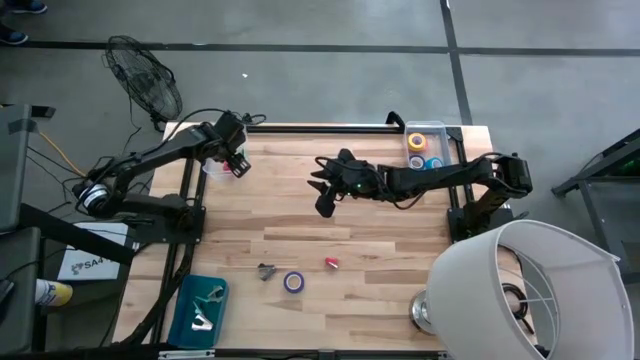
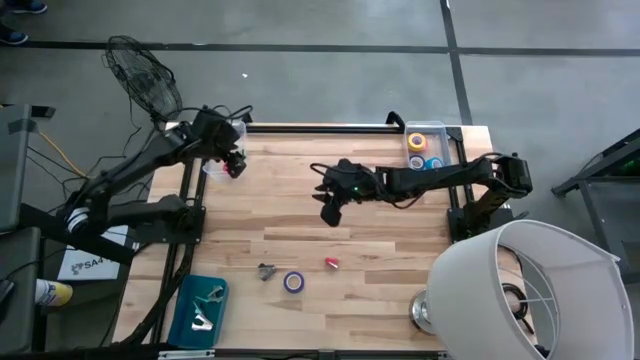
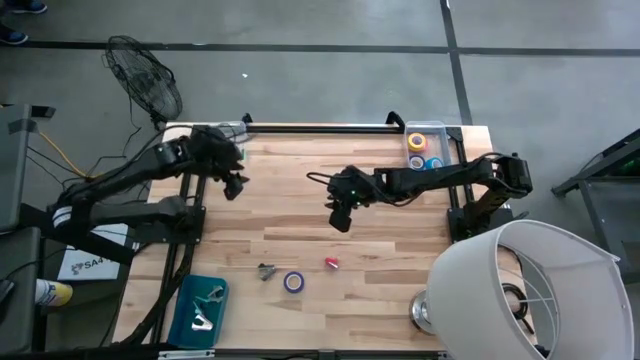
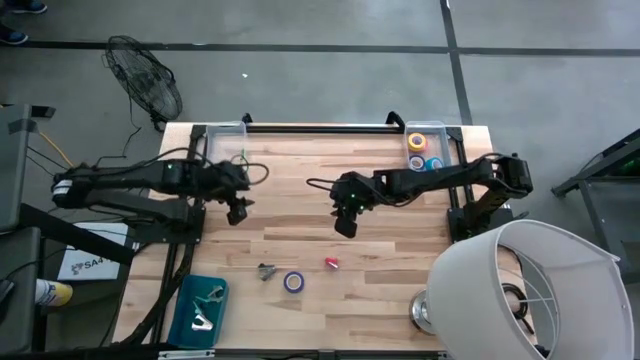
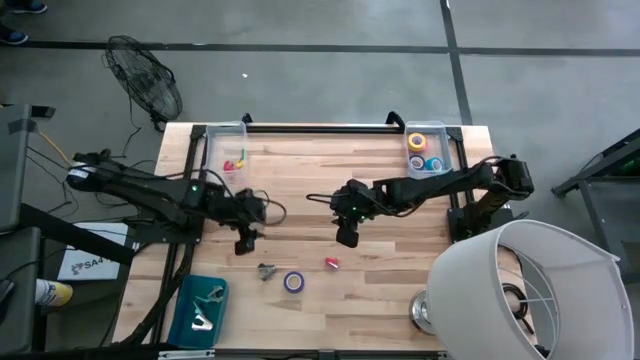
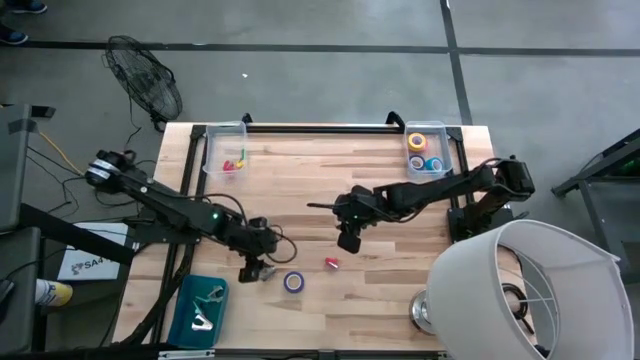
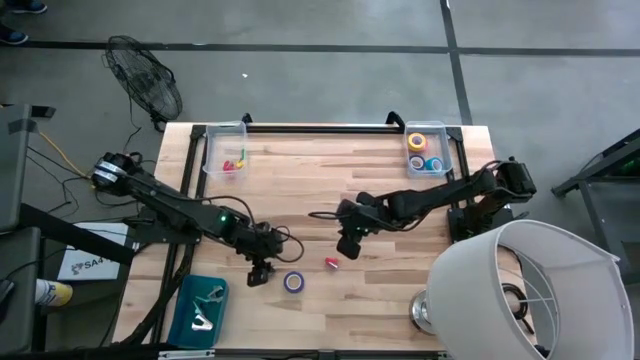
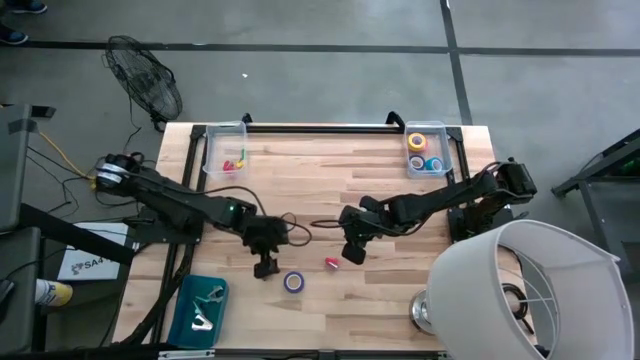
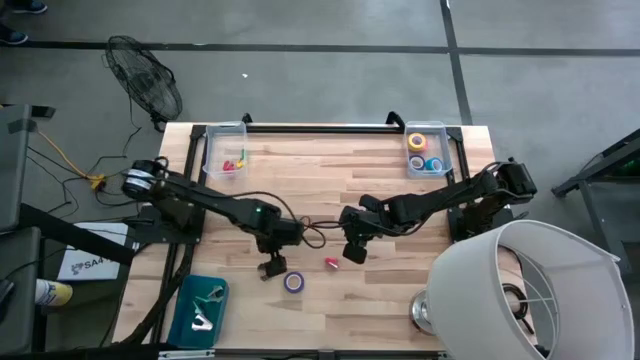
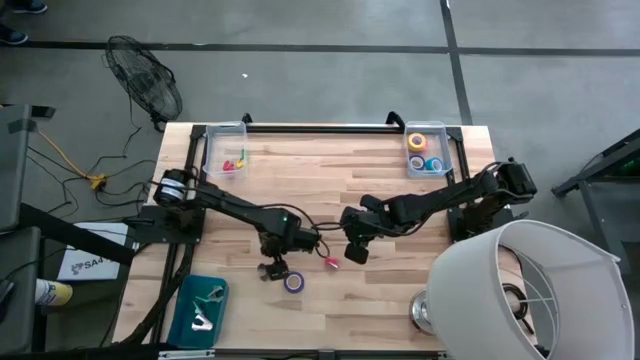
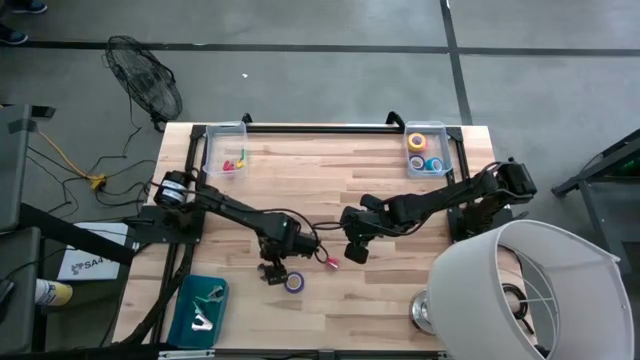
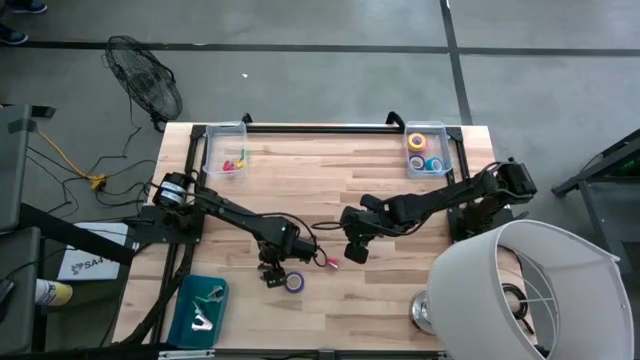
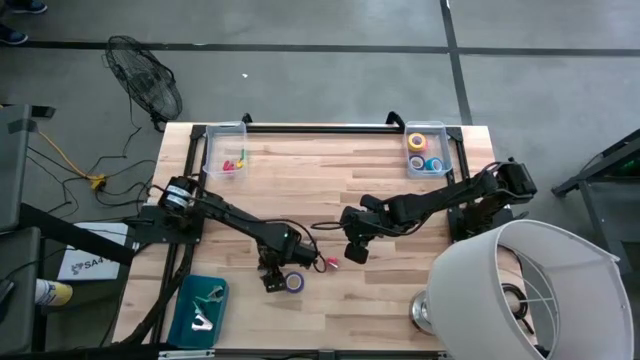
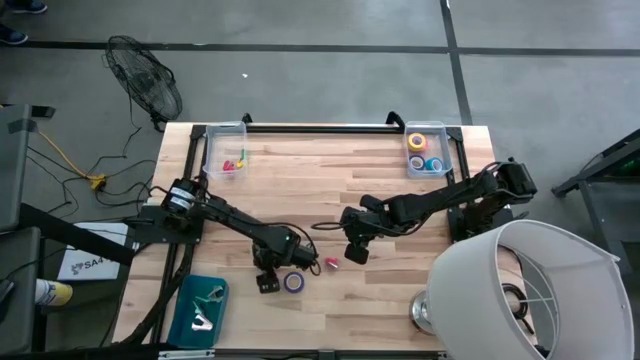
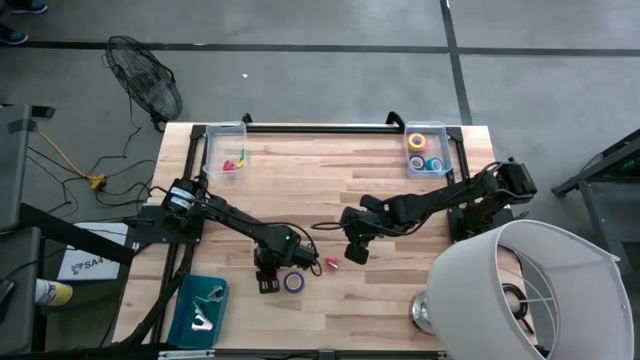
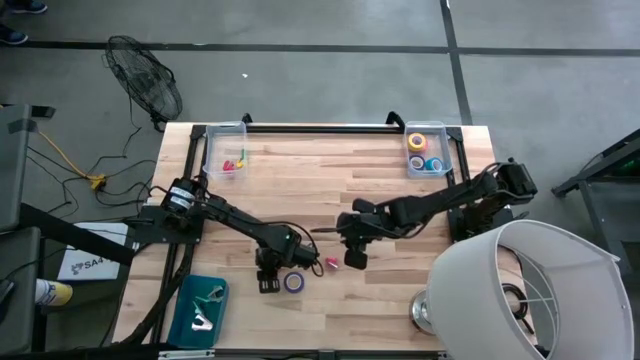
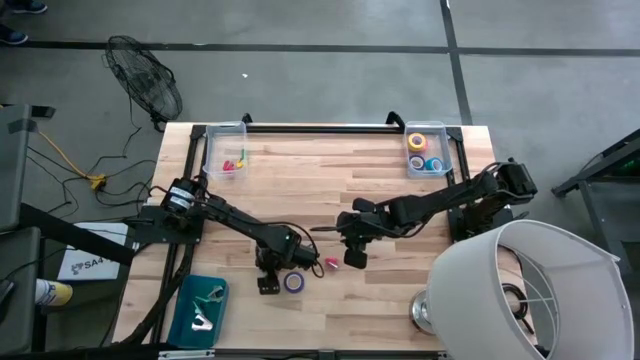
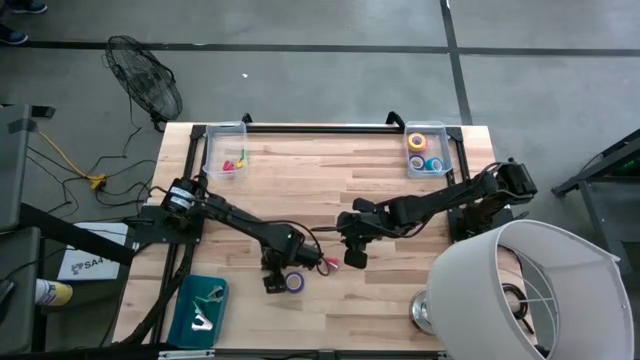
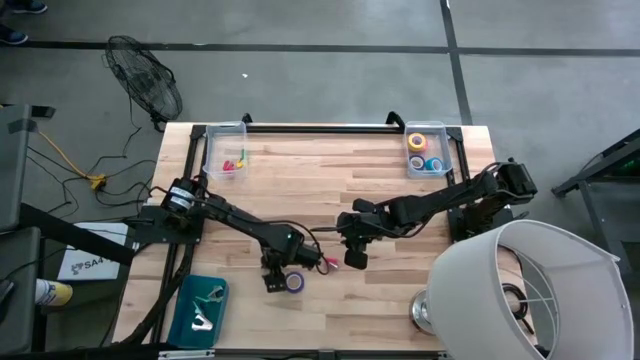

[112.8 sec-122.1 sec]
Task: Pick and place Stapler, Stapler remover, tape
Put the gray staple remover into the blue bin

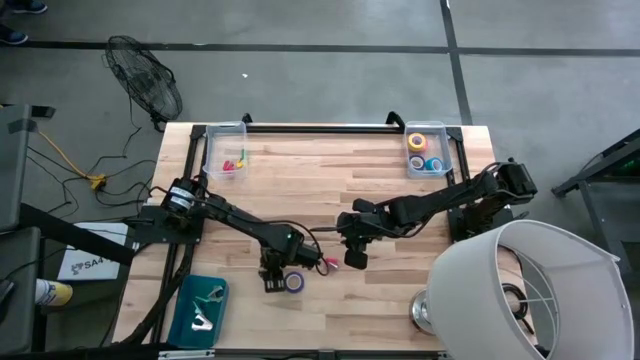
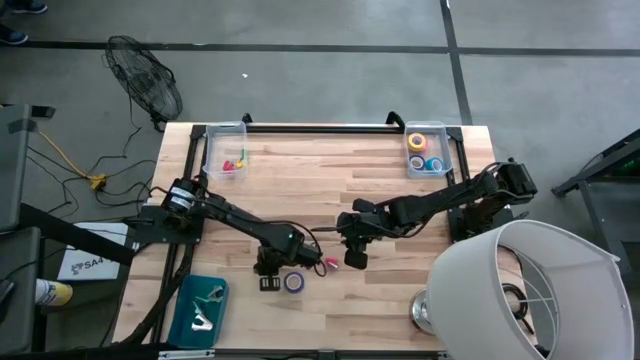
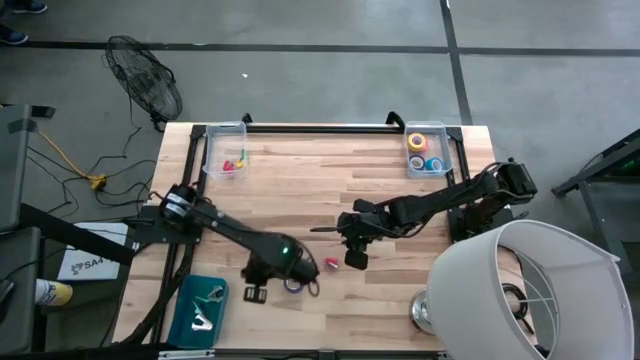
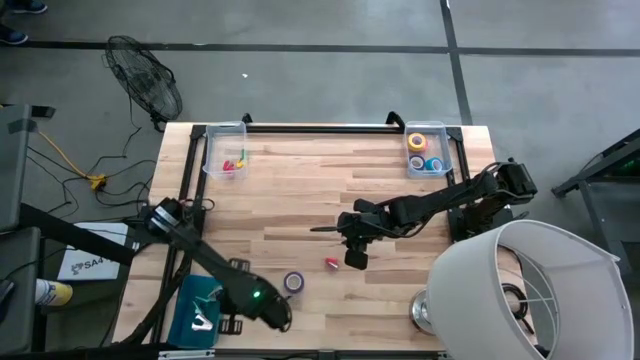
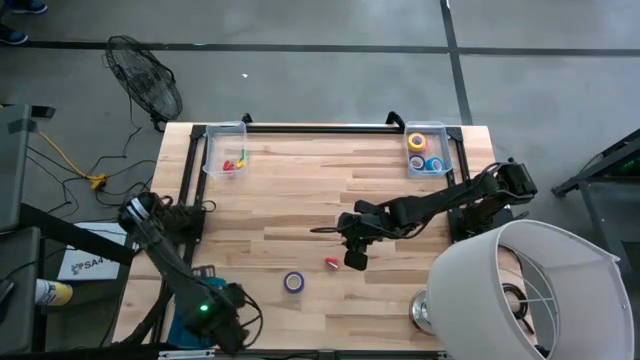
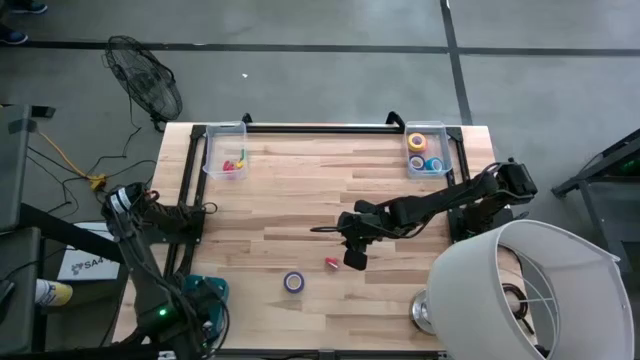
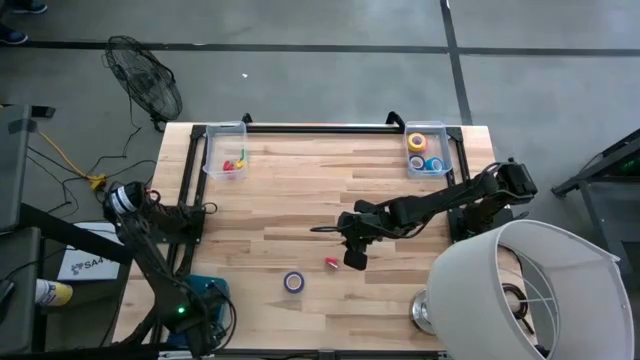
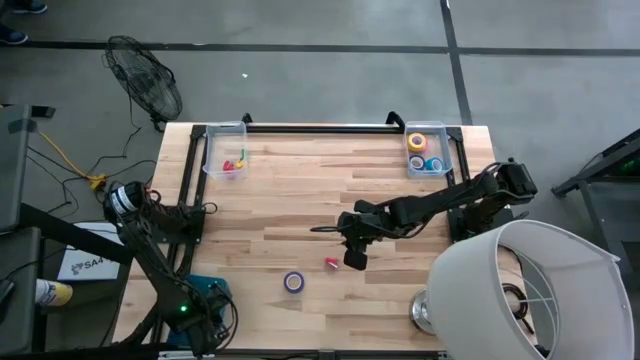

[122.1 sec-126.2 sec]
Put the gray staple remover into the blue bin

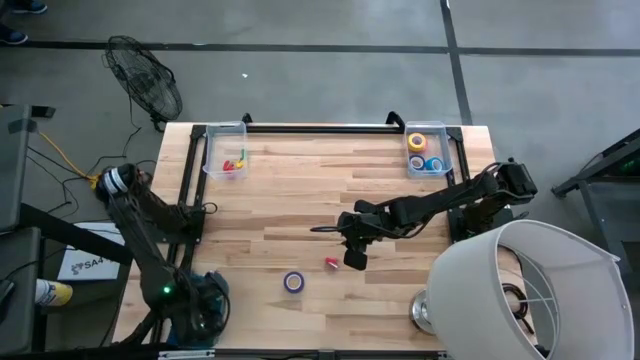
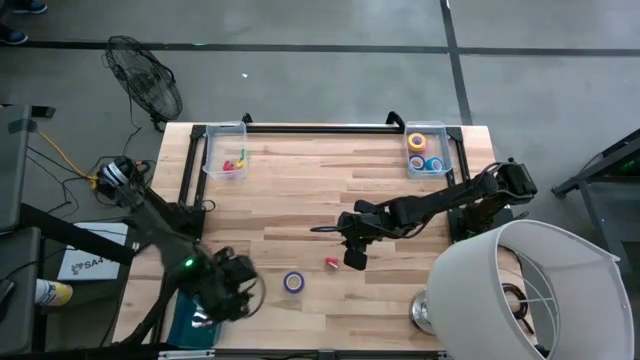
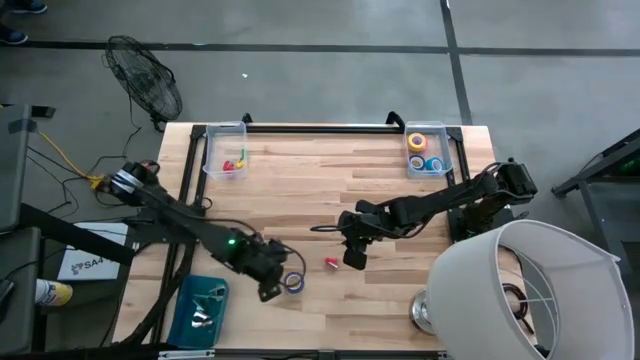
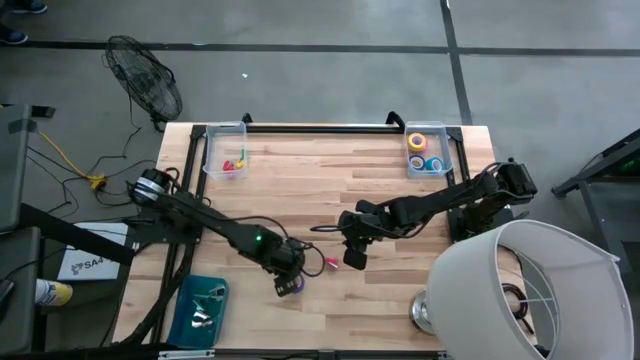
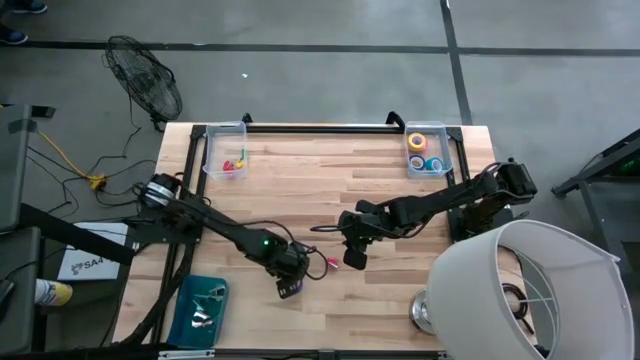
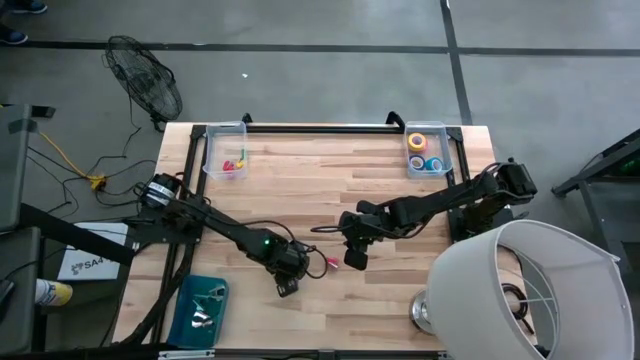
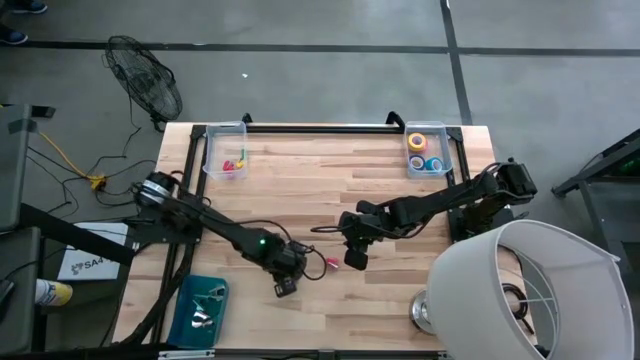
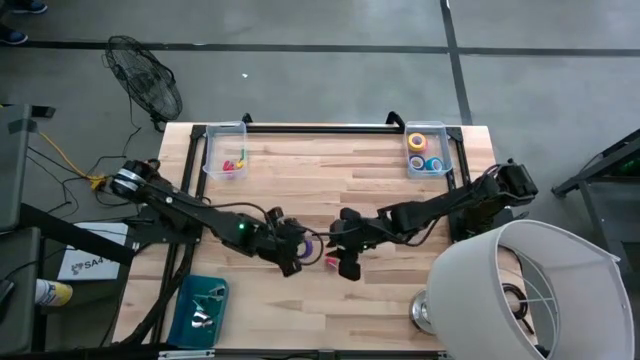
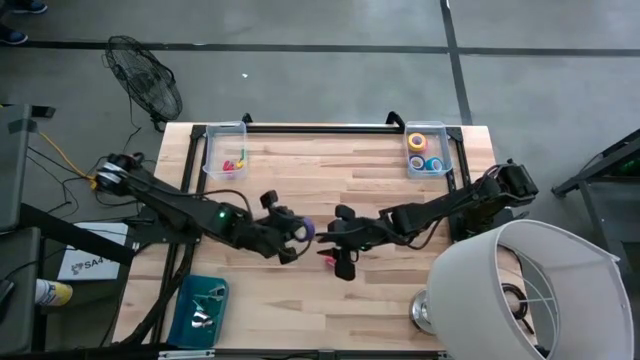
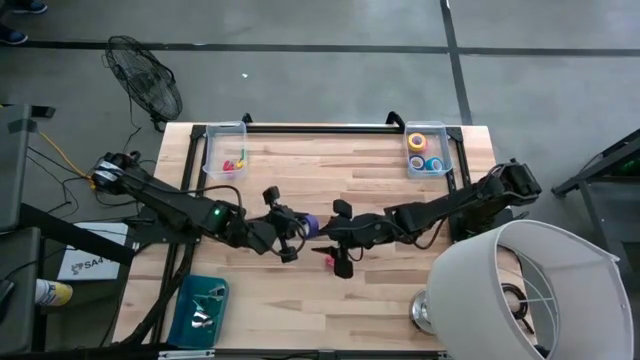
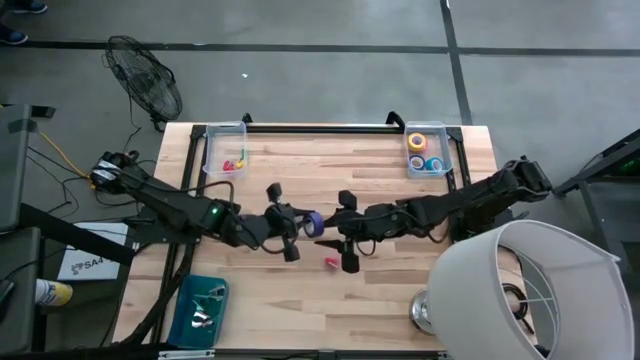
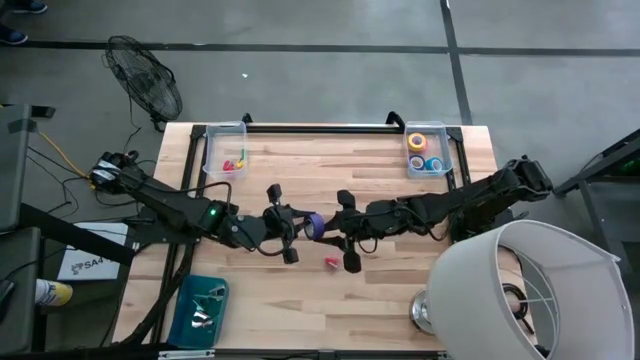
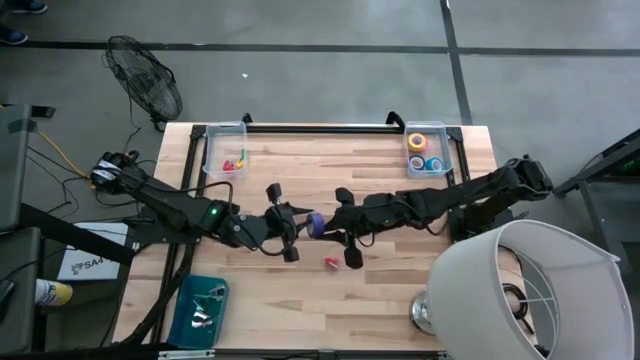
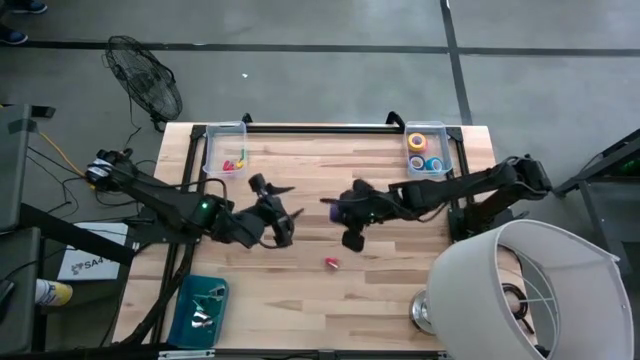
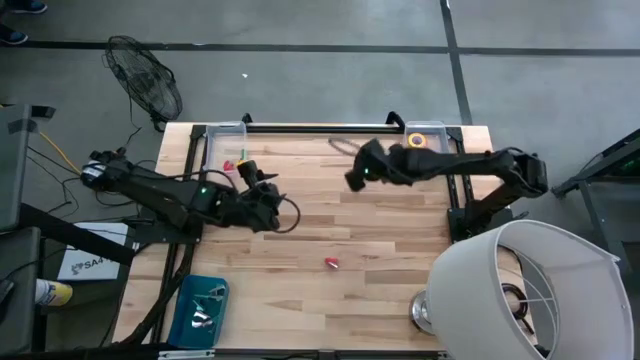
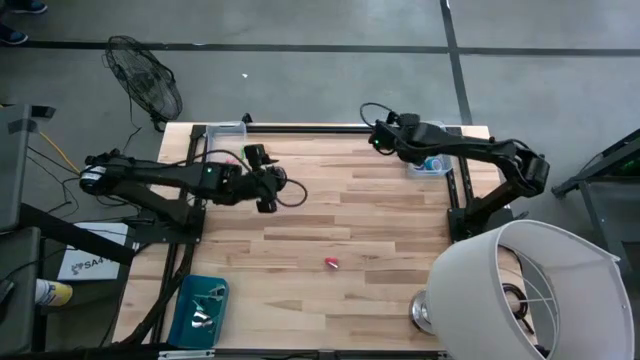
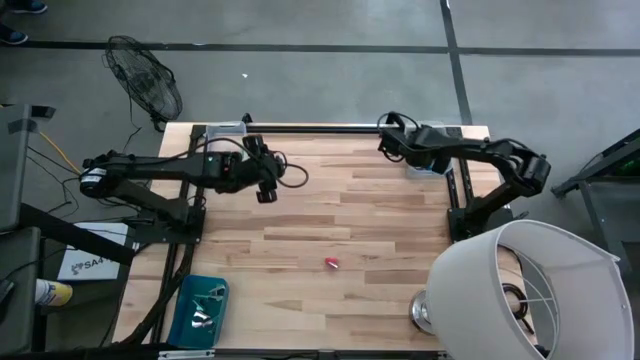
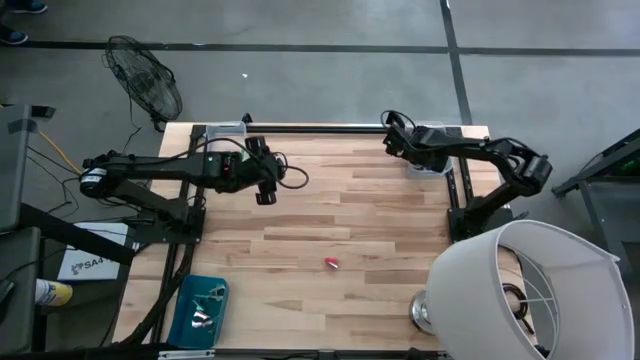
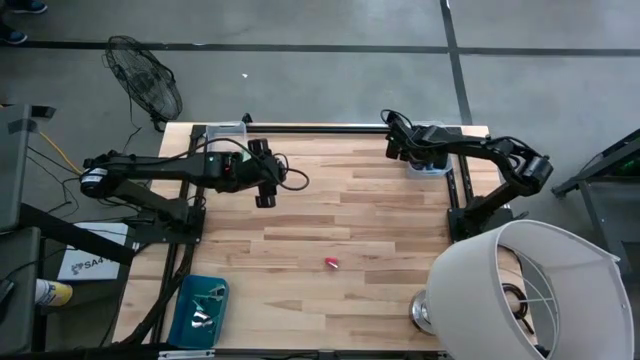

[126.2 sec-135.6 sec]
Put the purple tape into the right transparent bin
